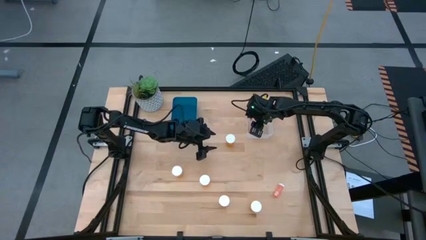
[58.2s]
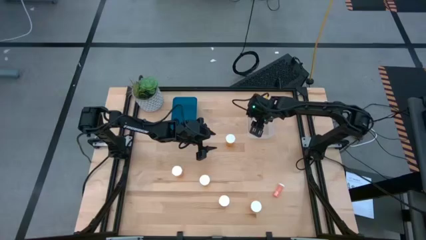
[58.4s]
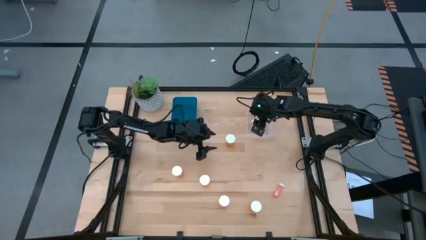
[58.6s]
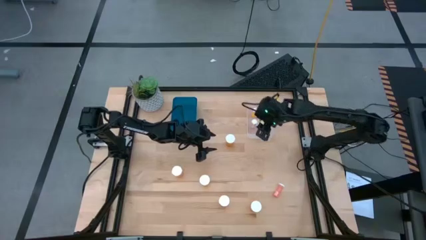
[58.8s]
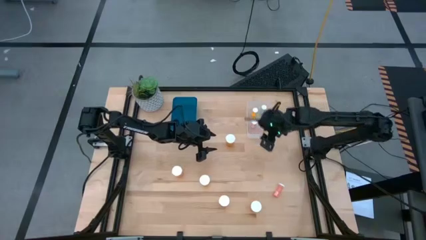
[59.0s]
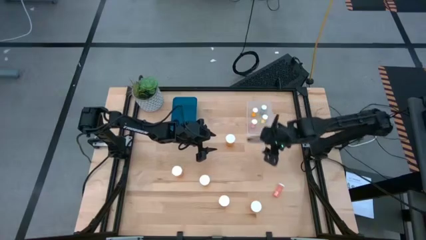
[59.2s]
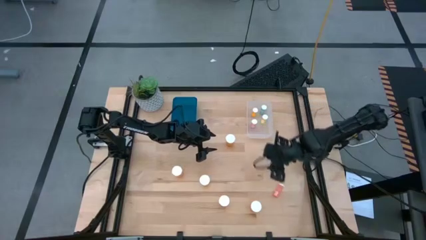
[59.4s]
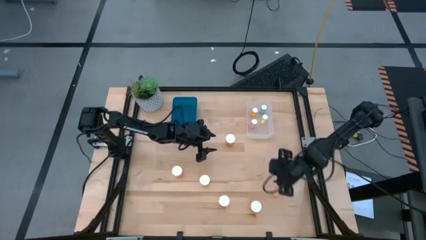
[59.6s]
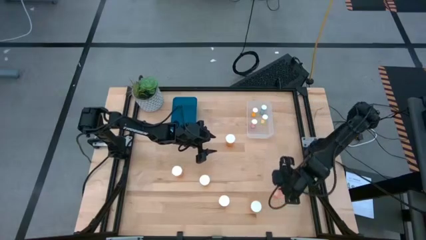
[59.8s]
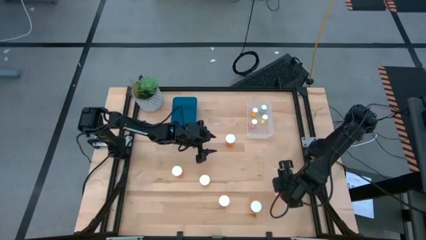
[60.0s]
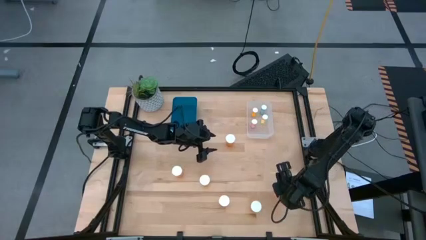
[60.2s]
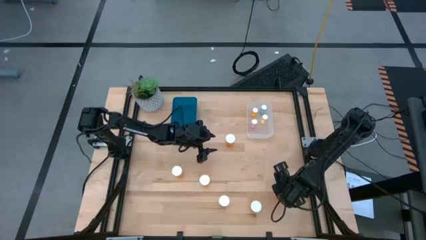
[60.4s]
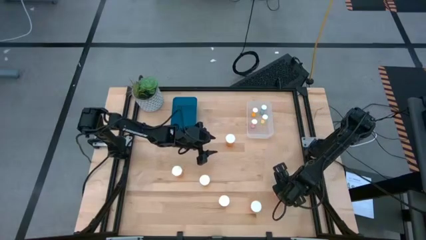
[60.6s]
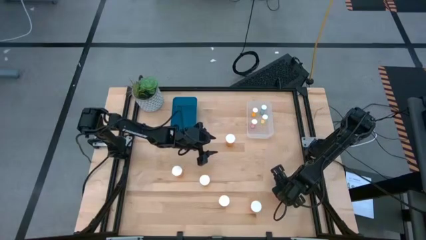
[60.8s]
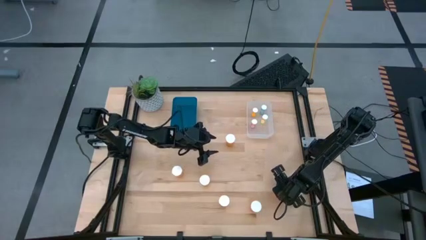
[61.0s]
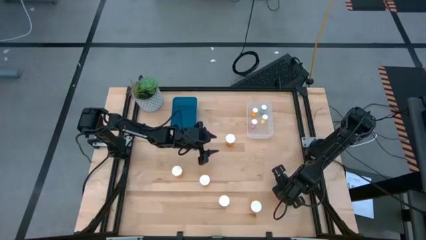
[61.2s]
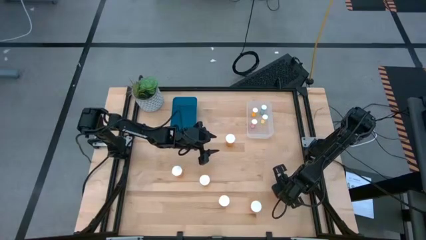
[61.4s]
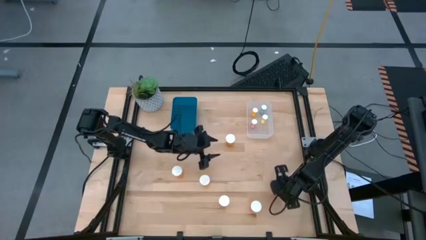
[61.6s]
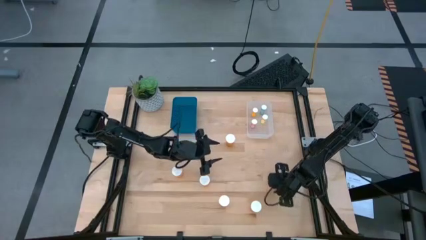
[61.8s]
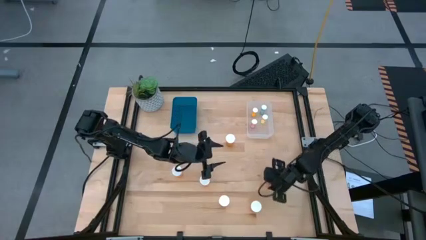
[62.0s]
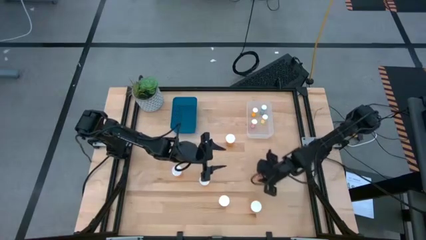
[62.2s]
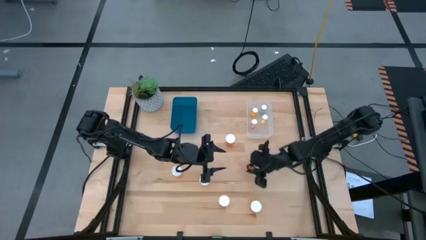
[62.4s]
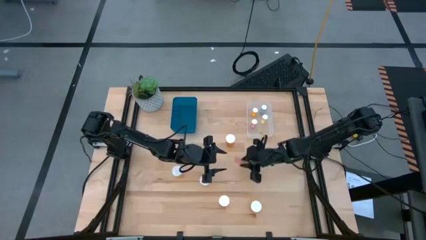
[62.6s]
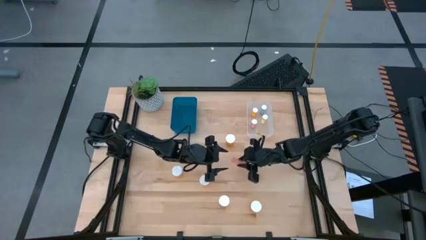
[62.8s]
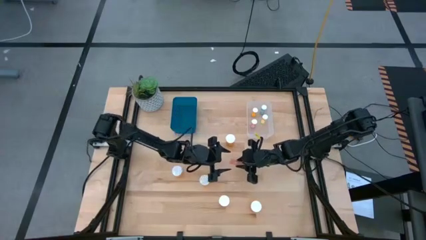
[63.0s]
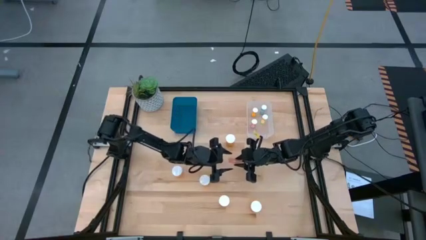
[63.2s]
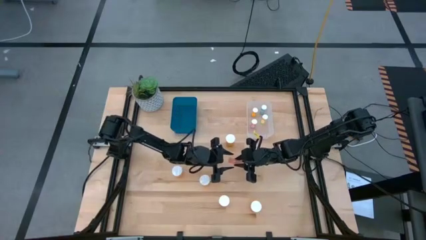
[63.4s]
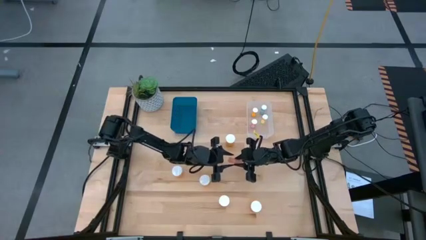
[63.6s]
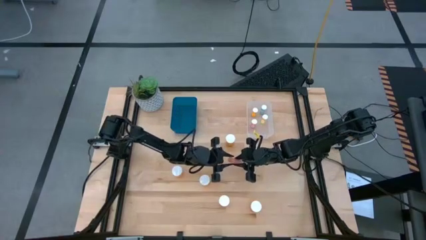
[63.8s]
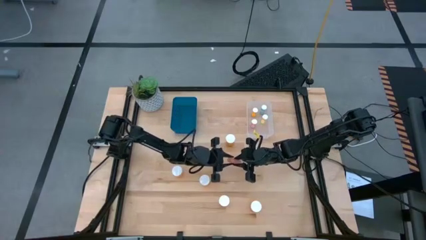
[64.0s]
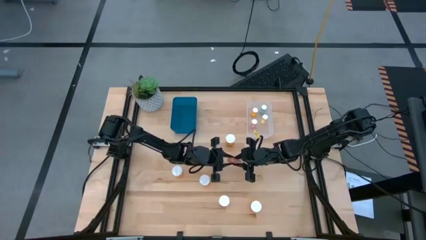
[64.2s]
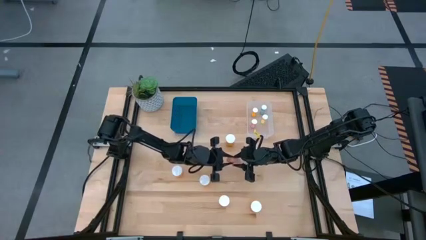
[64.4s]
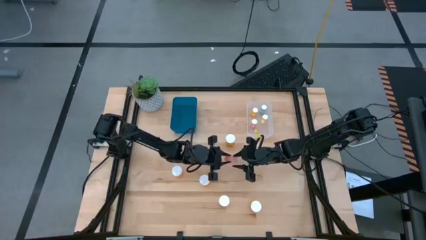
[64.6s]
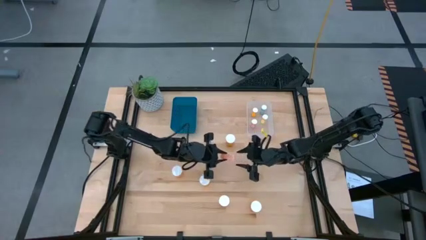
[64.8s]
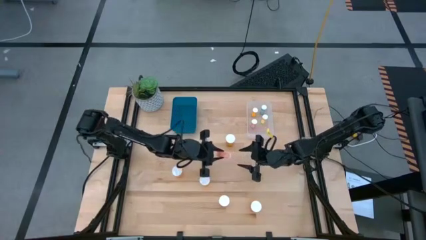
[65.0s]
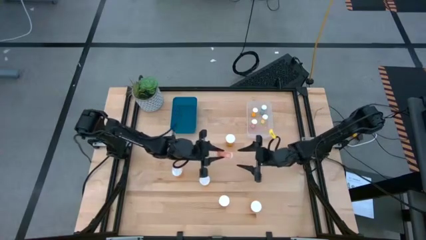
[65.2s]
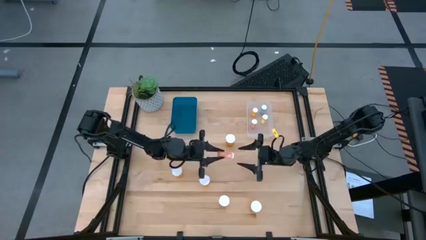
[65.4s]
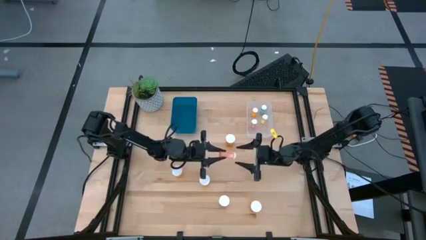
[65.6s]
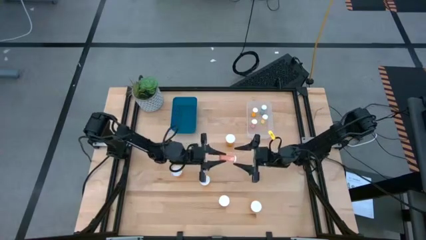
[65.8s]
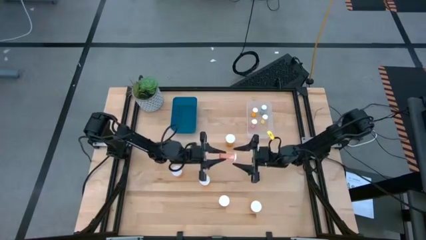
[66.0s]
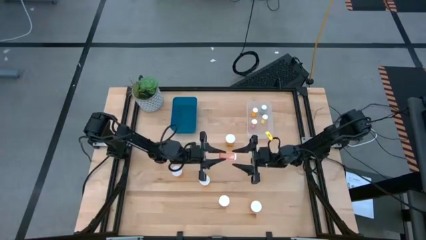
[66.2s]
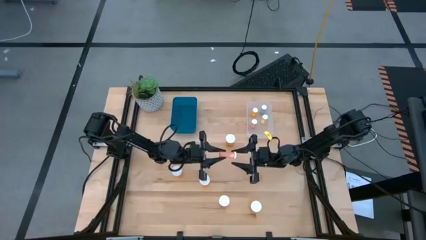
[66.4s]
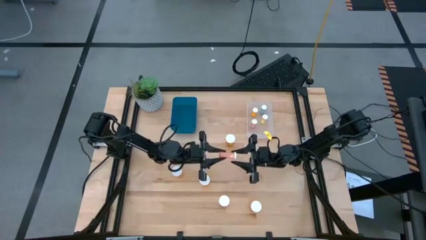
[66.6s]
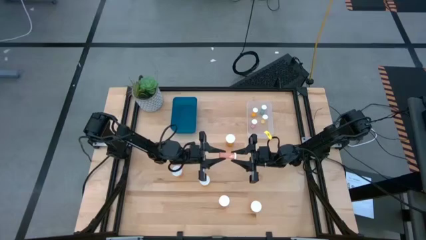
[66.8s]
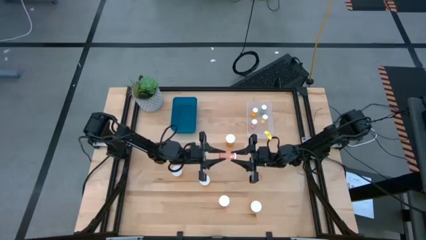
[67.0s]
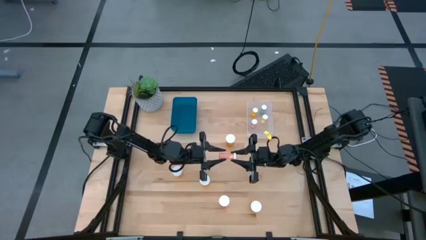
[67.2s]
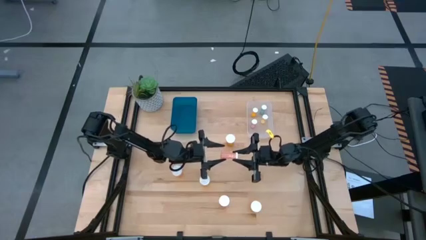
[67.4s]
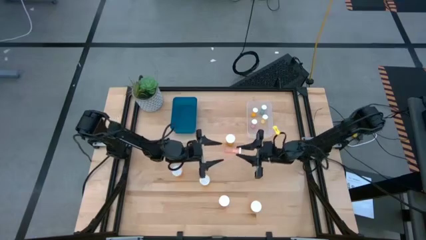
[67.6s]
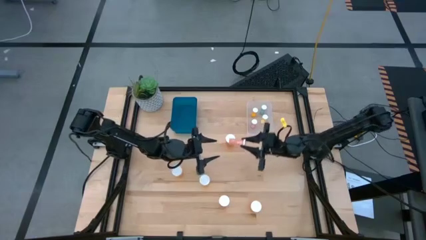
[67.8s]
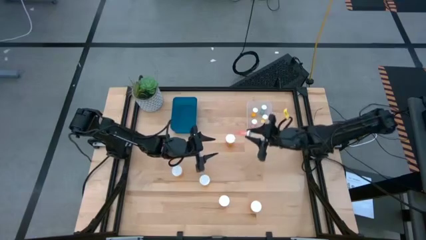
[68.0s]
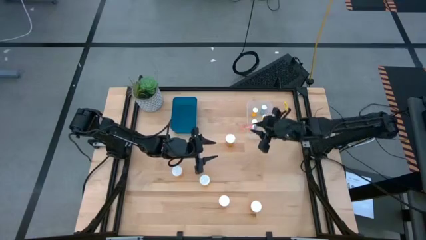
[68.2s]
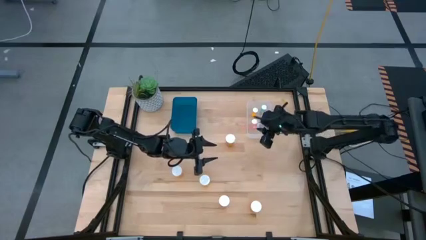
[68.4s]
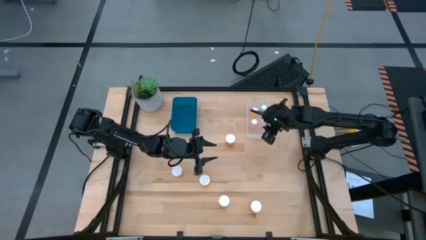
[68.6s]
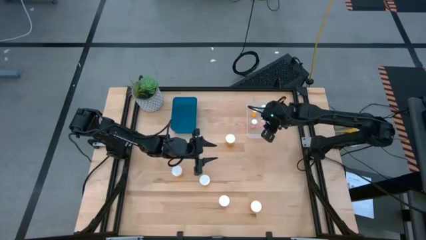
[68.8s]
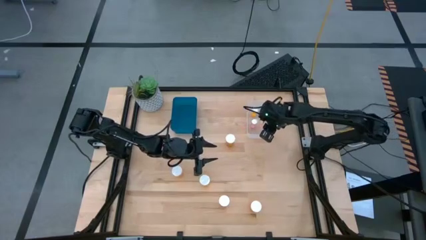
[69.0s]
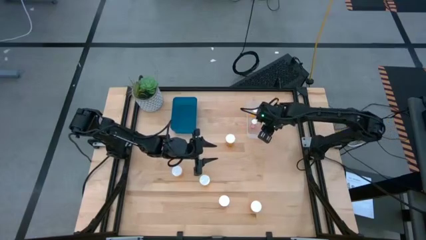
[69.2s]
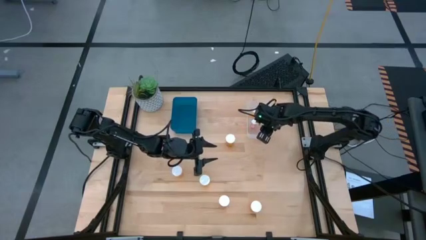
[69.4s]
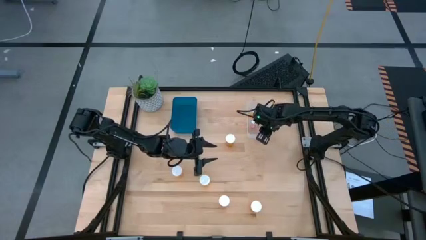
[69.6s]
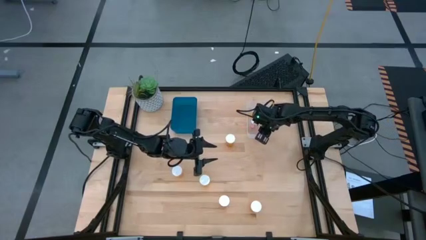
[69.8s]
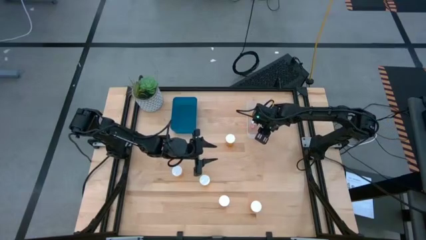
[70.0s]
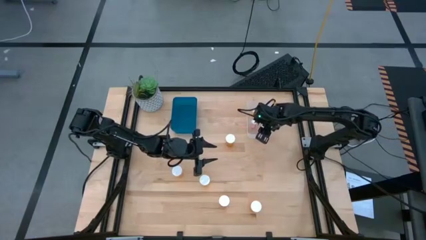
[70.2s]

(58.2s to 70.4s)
Task: Pick and place medicine bottles into bin by pill shape (circle, oval)
Put the small light orange pill bottle into the transparent bin

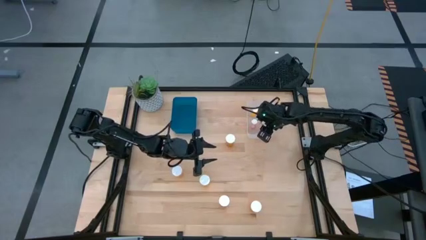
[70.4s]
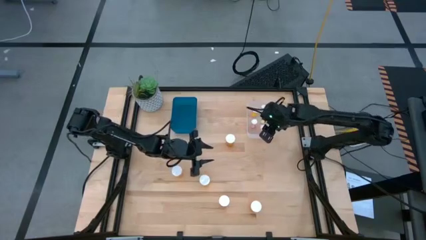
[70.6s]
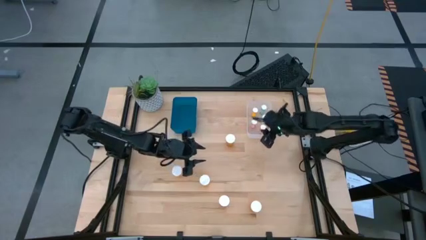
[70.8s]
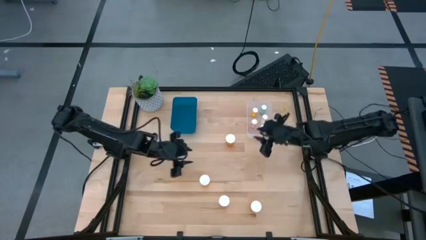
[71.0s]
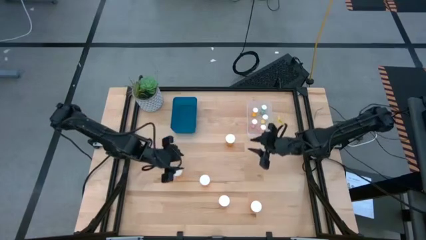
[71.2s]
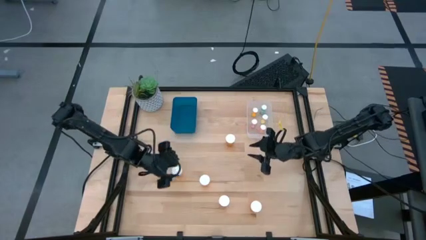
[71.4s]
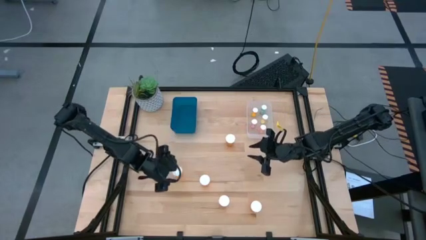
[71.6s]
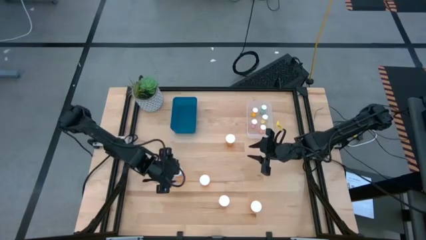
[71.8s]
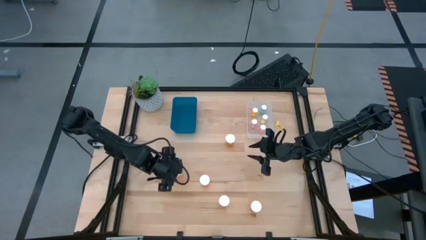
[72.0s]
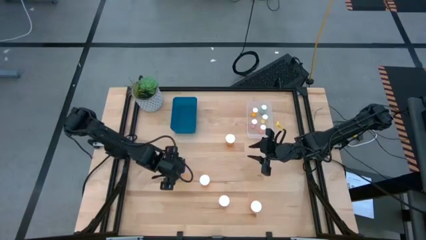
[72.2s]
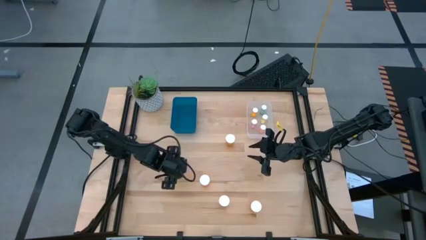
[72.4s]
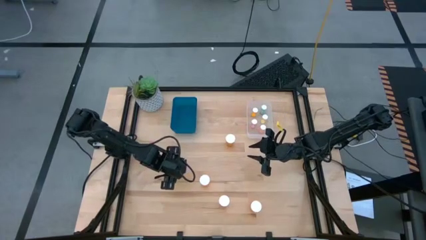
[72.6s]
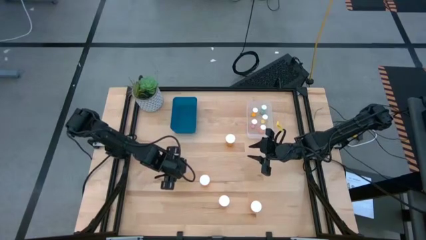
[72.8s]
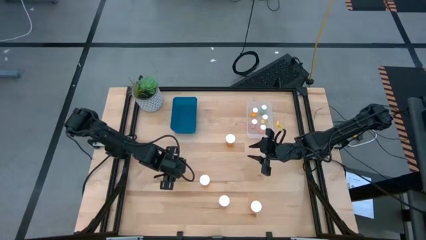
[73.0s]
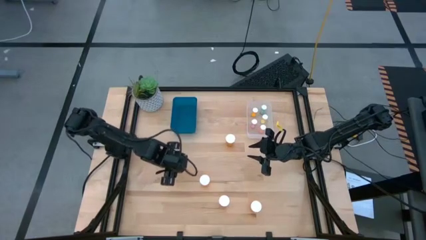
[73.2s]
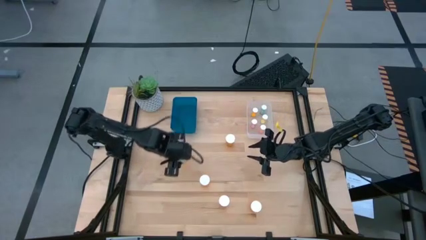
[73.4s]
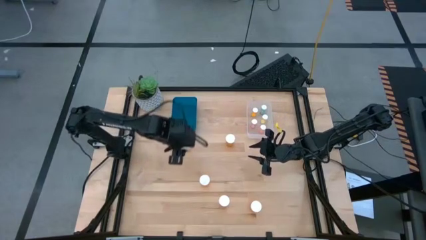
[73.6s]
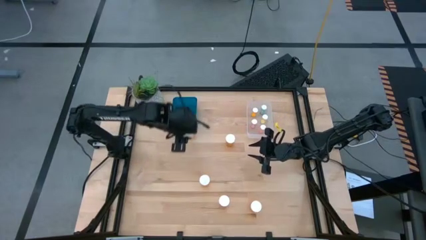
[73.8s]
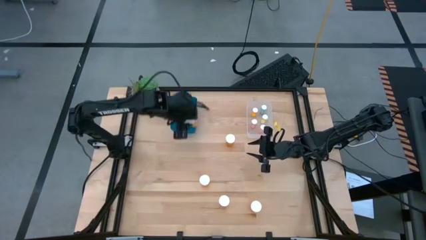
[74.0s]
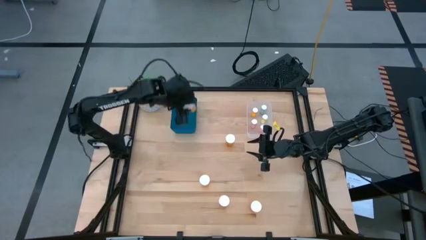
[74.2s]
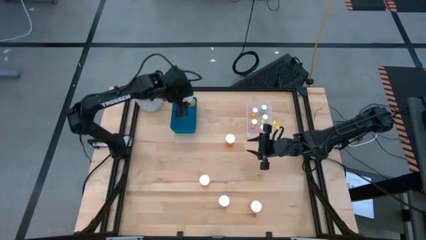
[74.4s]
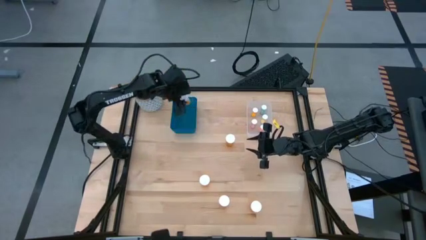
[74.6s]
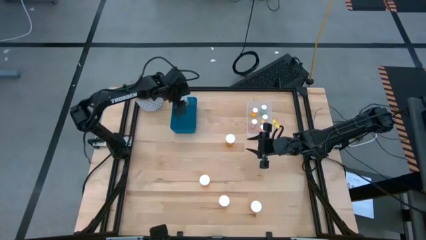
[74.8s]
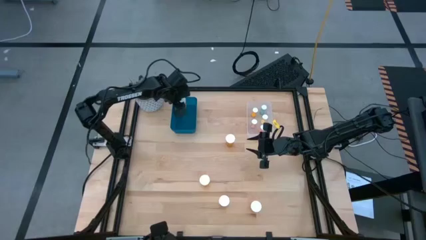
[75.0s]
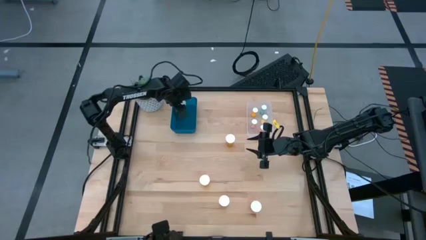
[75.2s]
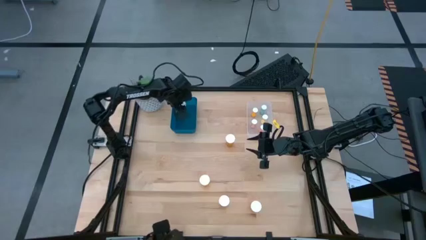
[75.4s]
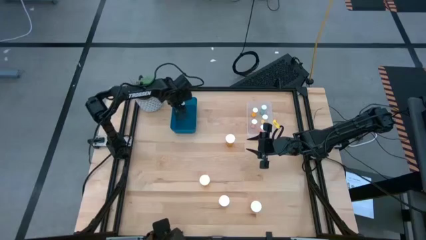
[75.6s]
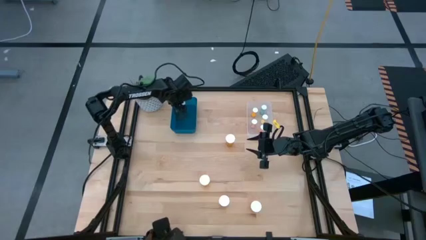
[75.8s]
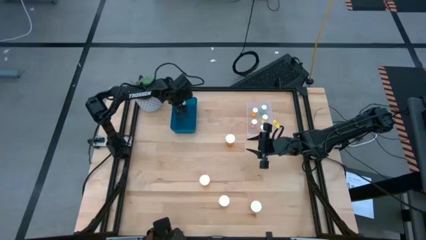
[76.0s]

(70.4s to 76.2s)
Put the large orange pill bottle into the blue bin
